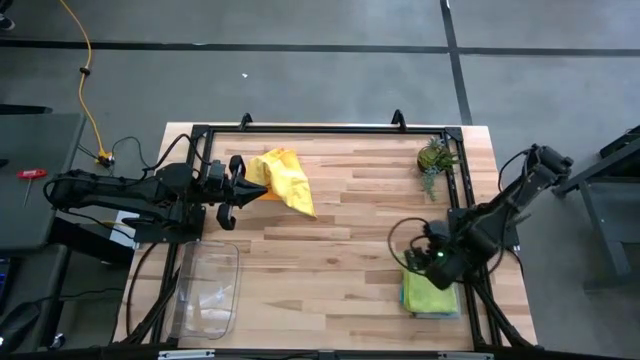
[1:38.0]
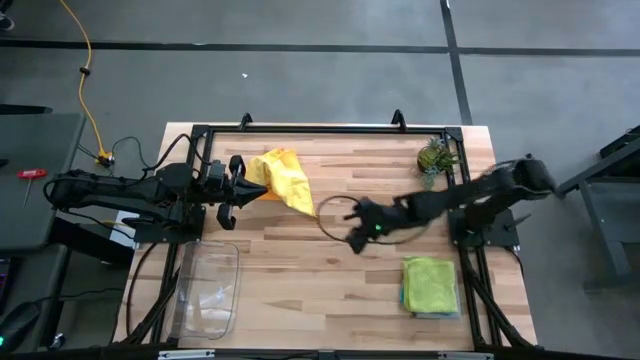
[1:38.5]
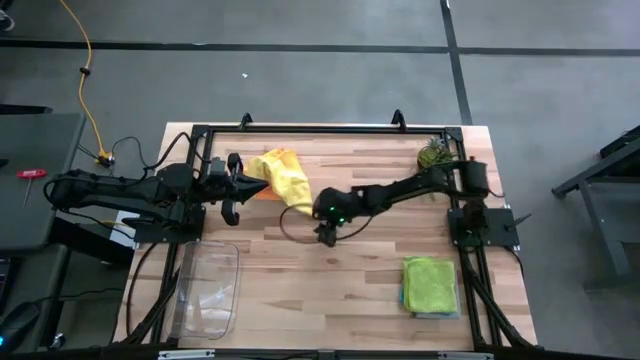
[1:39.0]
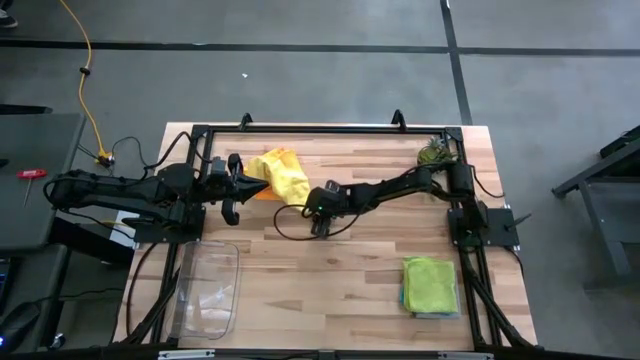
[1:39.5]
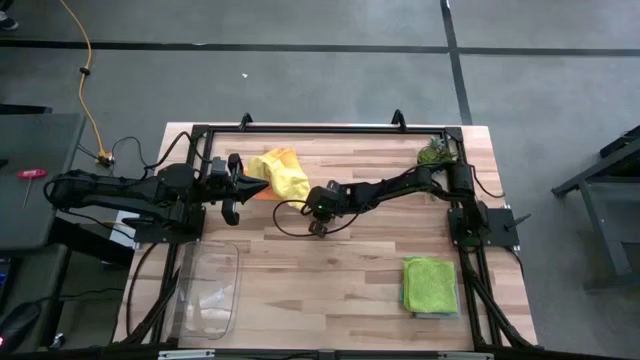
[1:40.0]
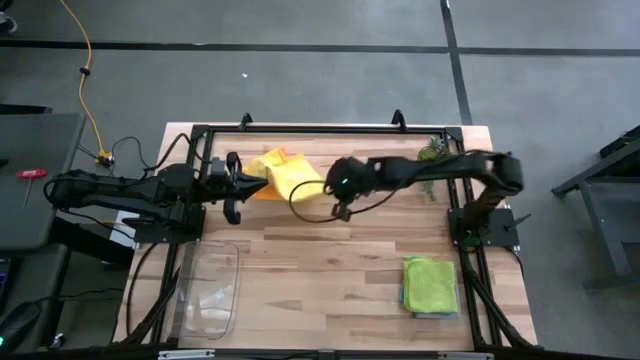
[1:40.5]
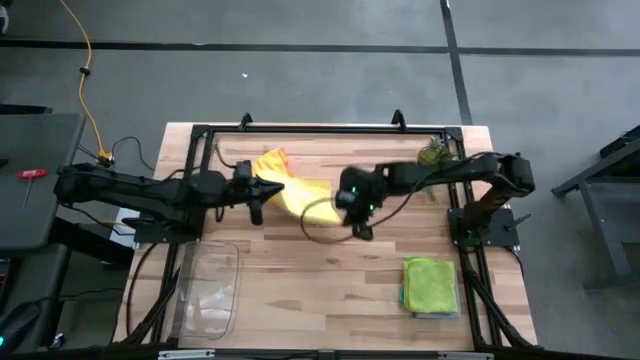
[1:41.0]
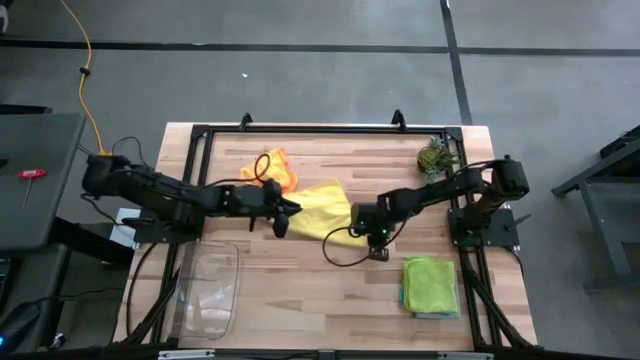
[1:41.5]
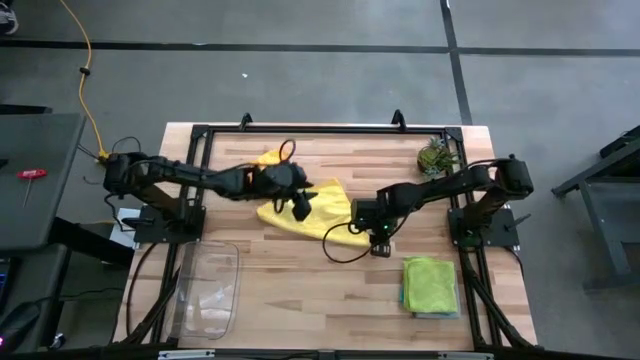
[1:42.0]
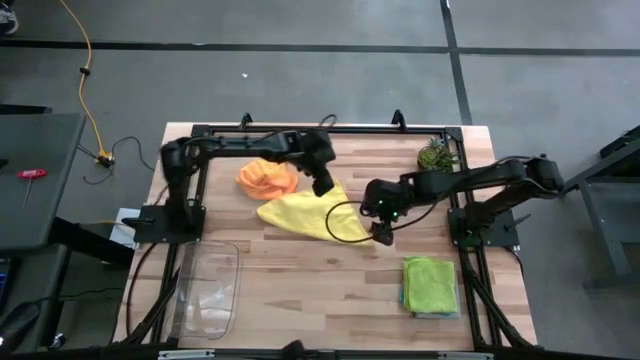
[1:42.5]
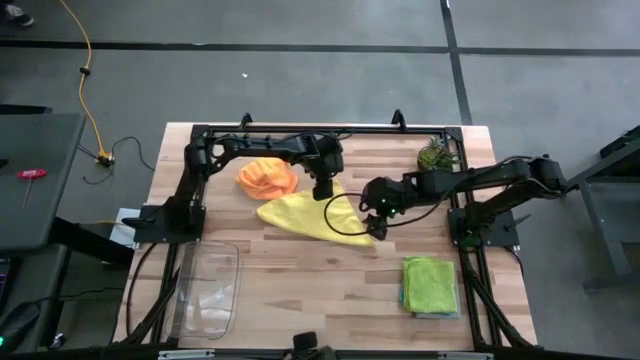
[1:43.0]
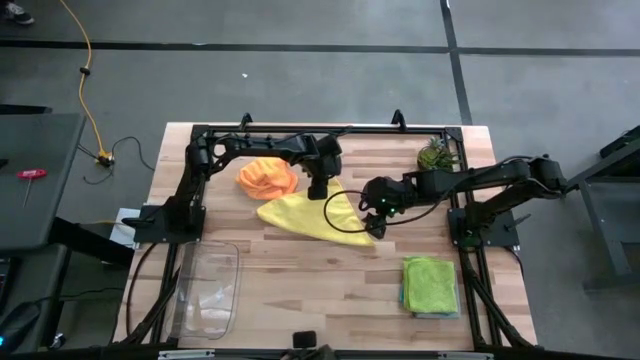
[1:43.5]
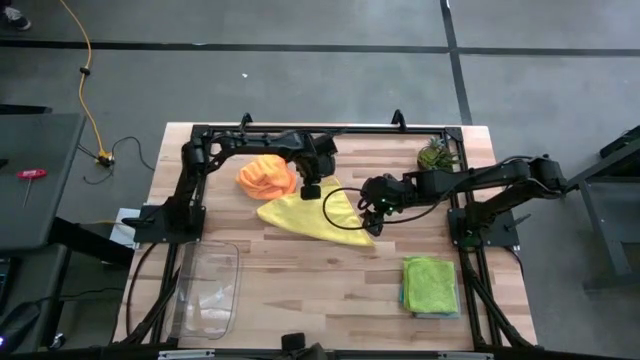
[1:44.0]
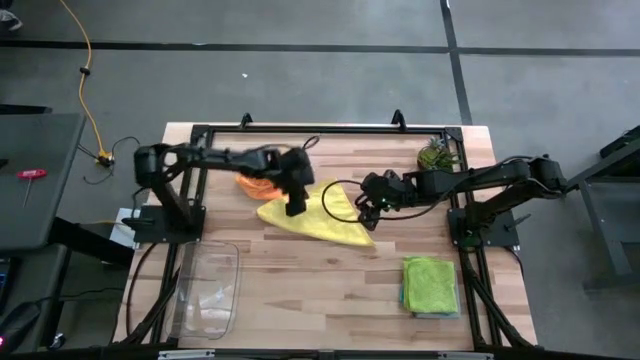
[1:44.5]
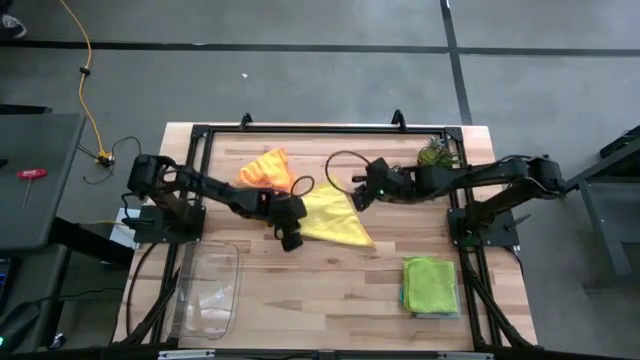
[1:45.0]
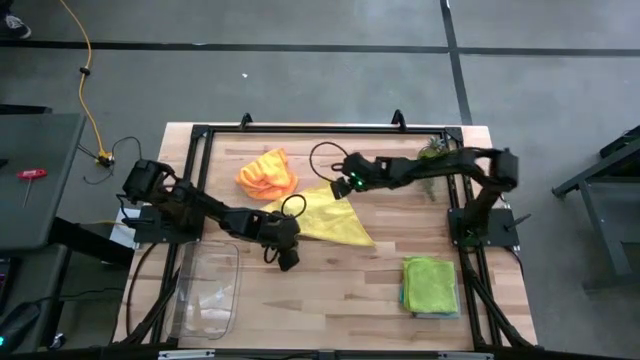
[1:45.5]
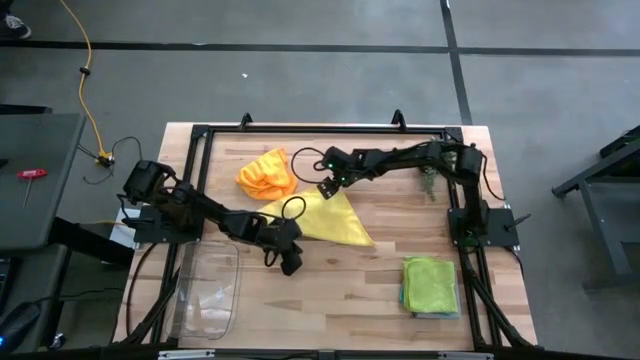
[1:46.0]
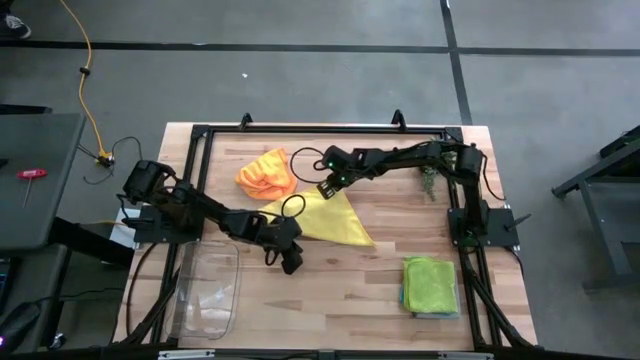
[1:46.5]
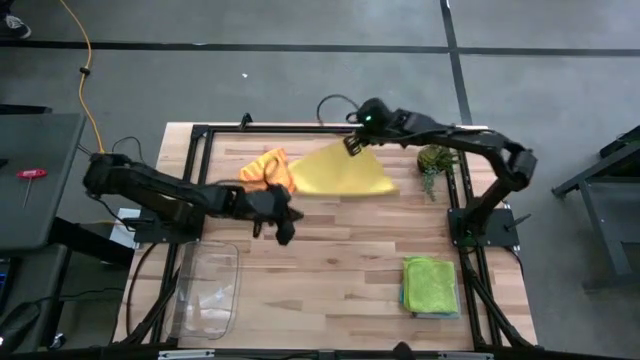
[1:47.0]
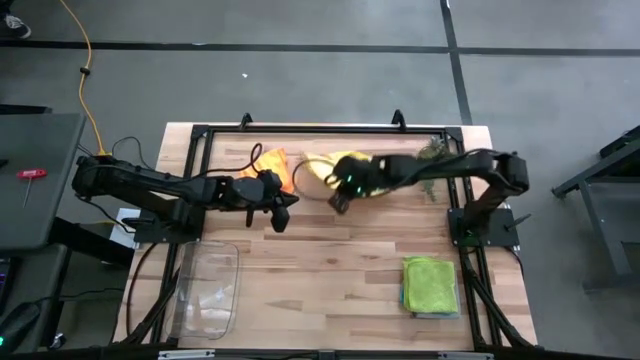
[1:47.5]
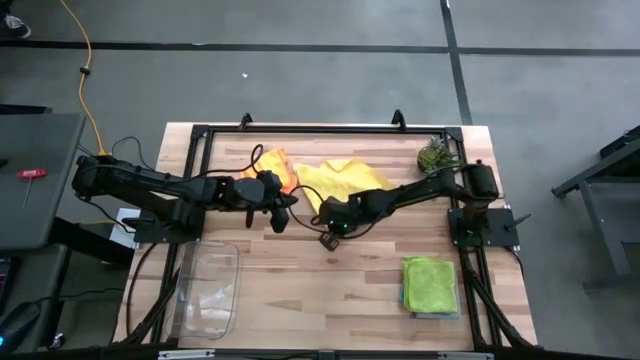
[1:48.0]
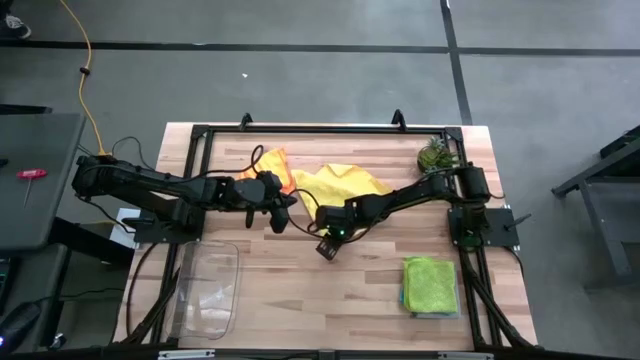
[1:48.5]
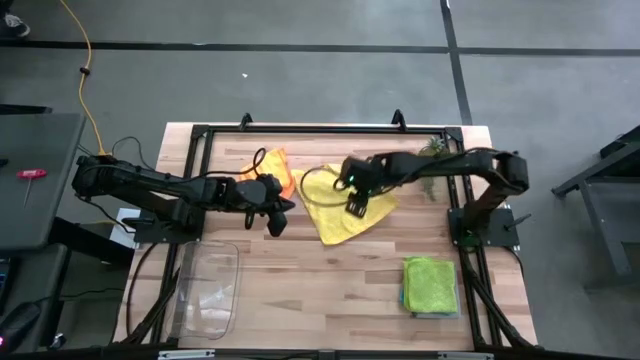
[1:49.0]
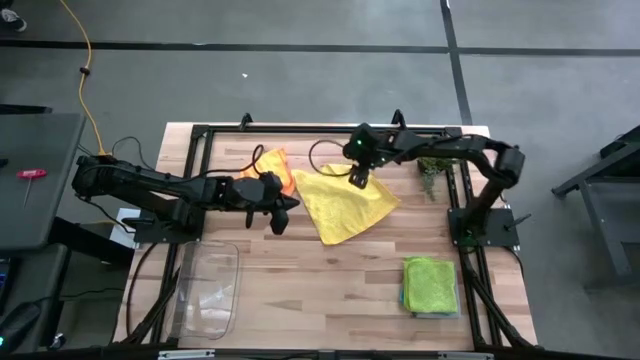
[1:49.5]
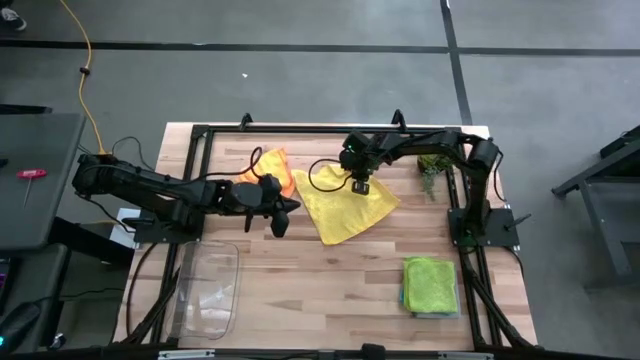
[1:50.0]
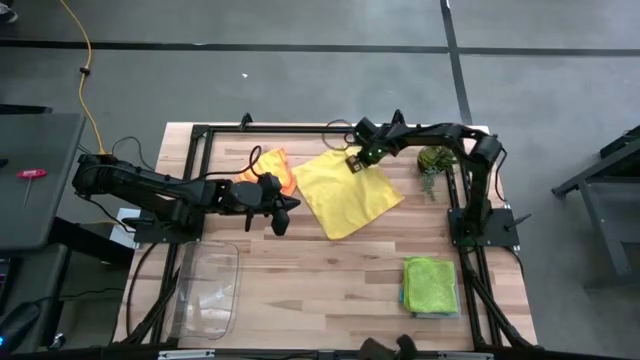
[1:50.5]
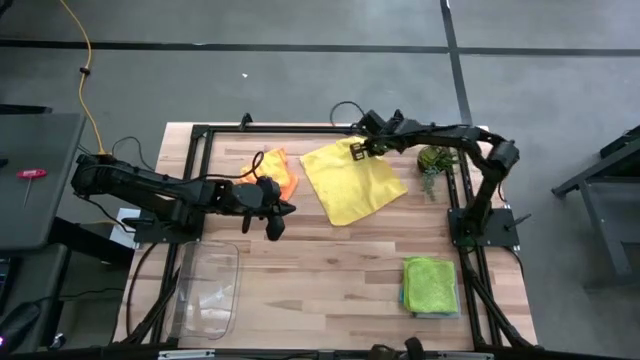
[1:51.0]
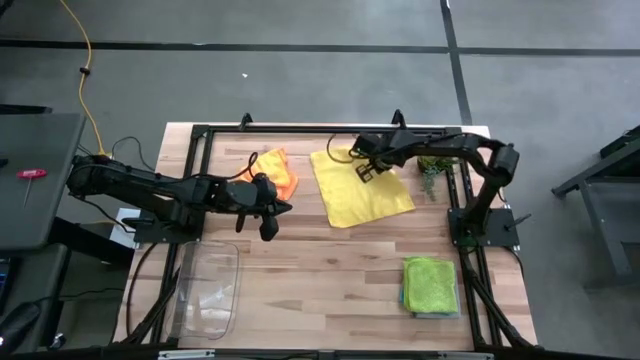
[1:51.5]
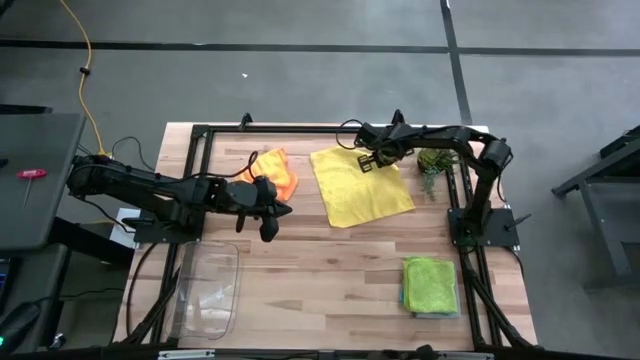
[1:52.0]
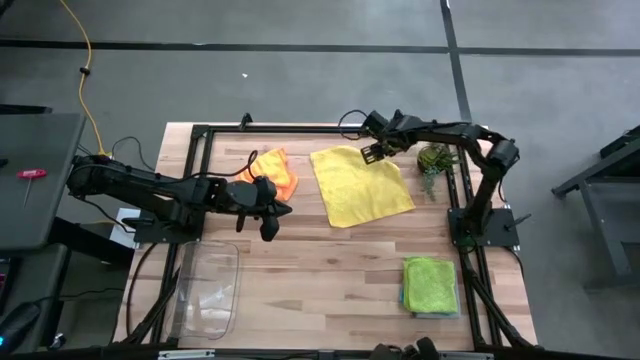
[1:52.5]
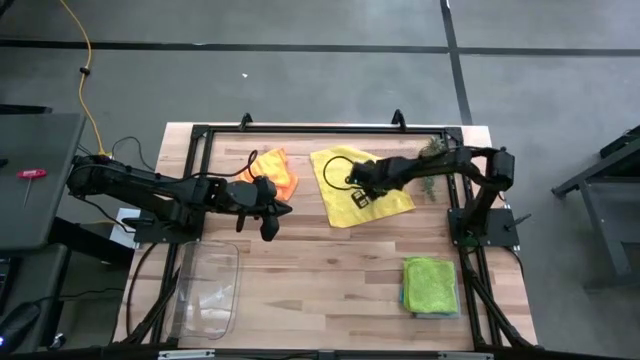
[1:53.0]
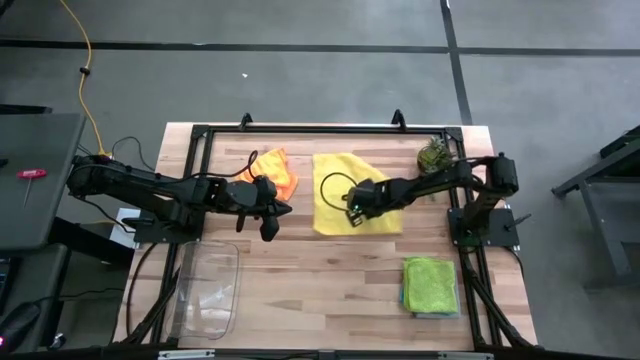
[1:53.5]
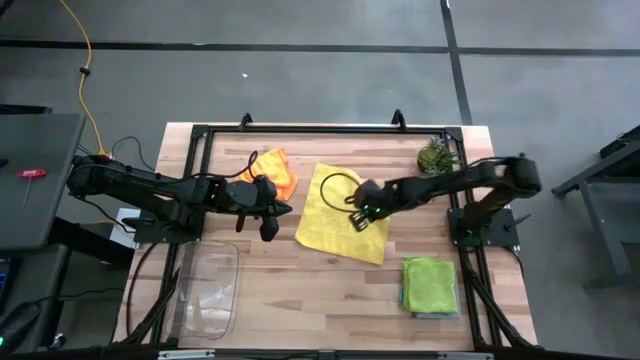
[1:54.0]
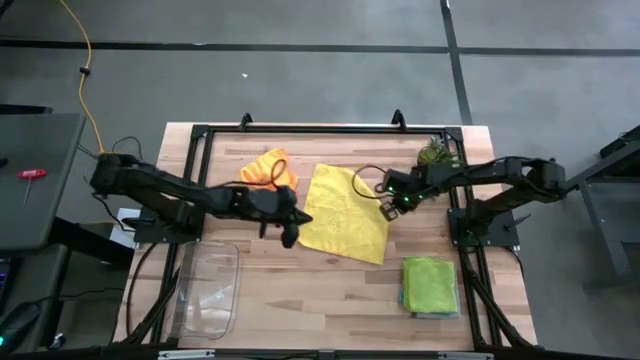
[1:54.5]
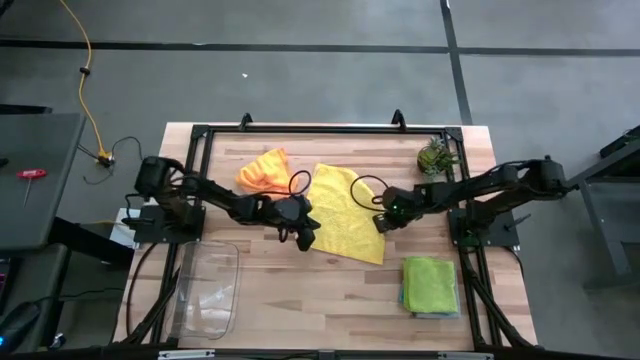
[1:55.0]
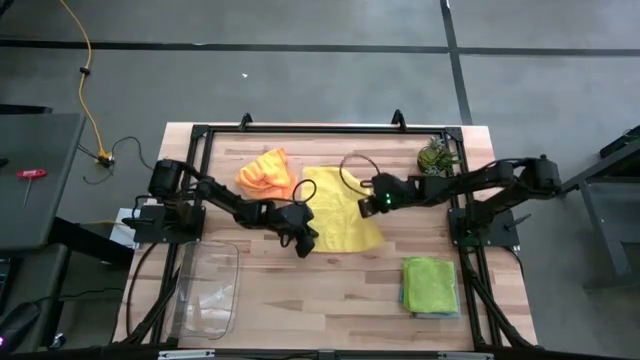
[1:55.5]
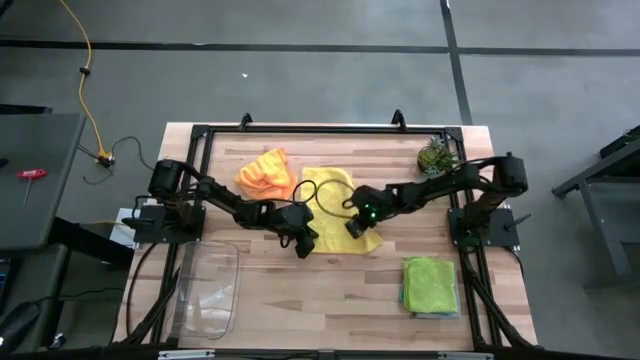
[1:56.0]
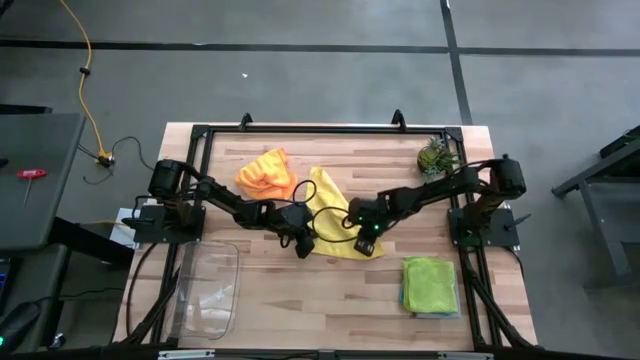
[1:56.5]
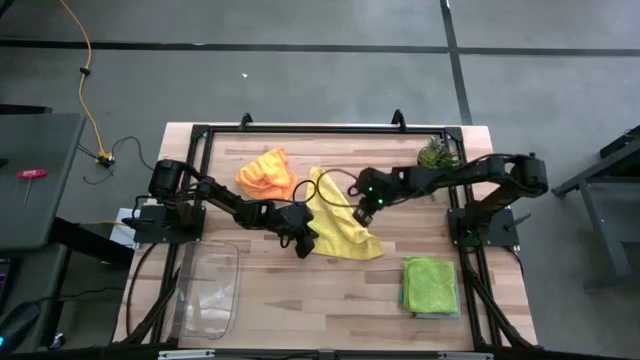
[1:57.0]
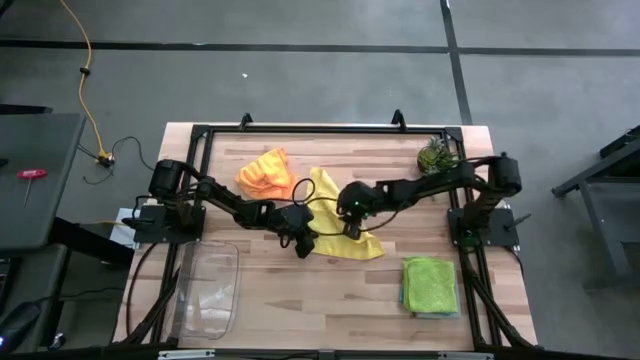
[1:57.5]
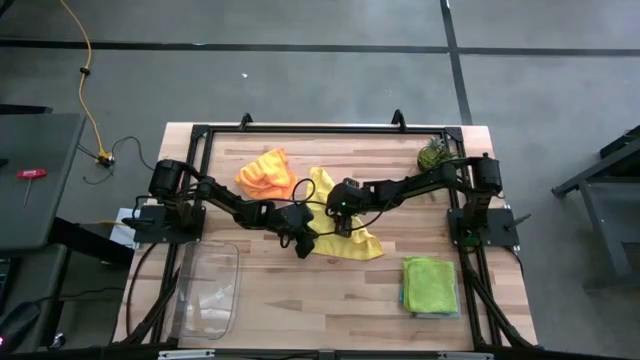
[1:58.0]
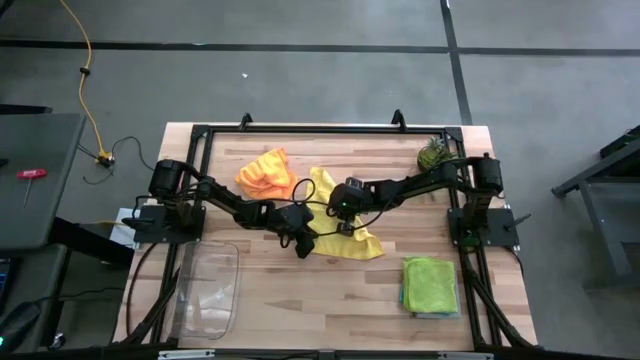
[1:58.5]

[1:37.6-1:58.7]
Task: Fold microfiber towels
Fold the yellow microfiber cloth

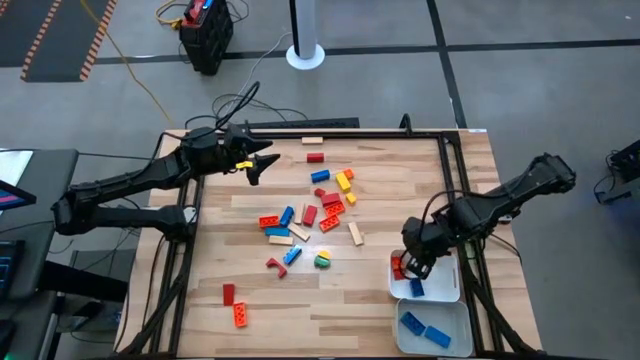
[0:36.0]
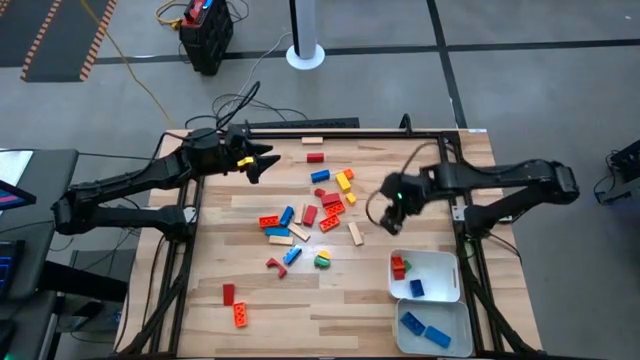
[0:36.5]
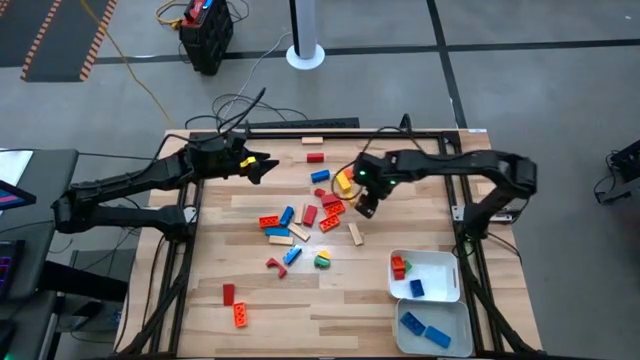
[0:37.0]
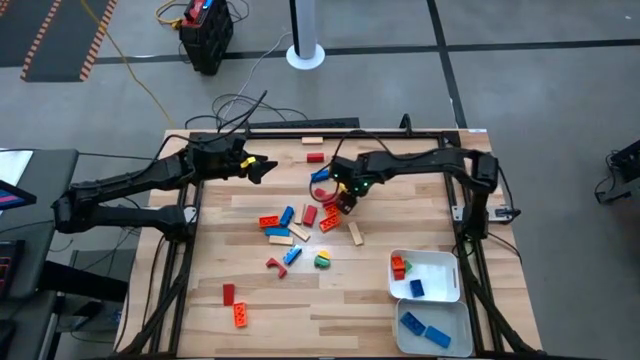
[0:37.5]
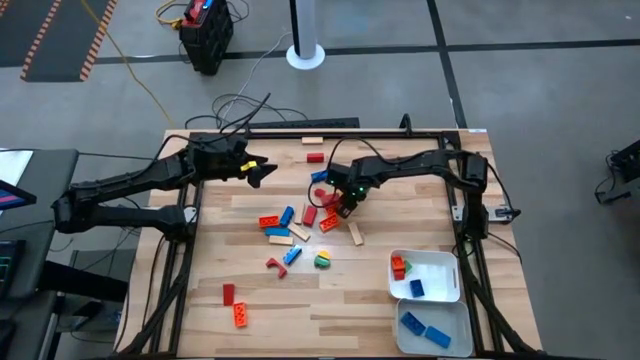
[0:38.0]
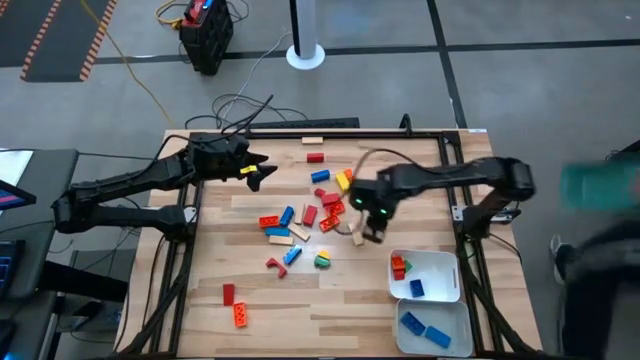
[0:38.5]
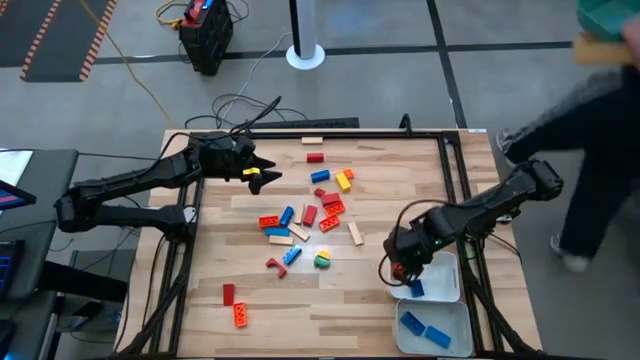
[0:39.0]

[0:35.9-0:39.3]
Task: Sort blocks by size
Put the small yellow game piece into the white bin
